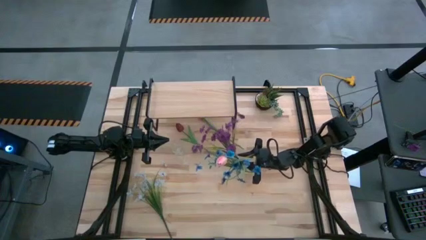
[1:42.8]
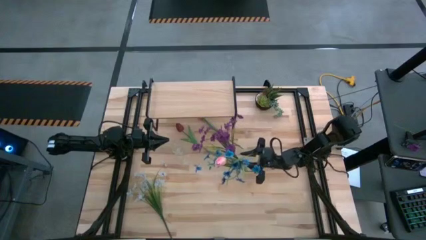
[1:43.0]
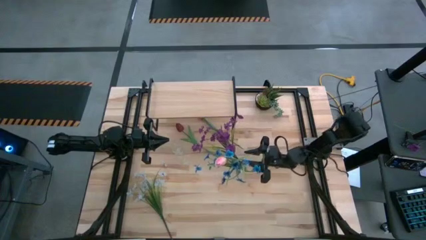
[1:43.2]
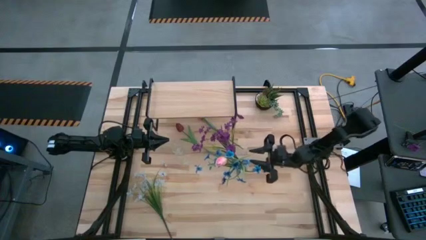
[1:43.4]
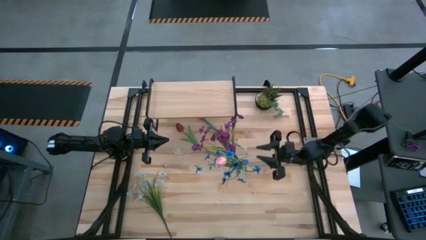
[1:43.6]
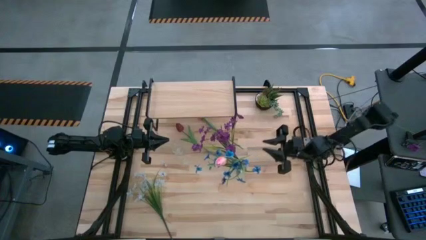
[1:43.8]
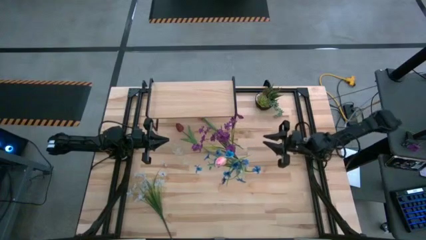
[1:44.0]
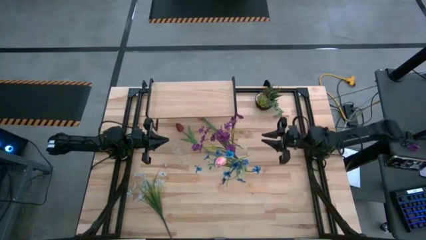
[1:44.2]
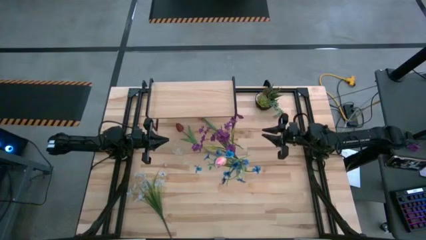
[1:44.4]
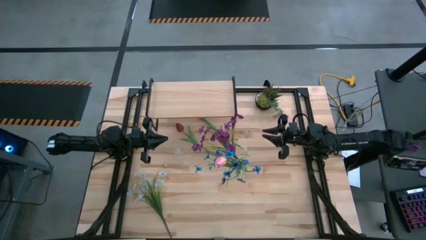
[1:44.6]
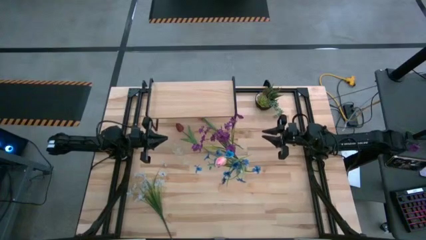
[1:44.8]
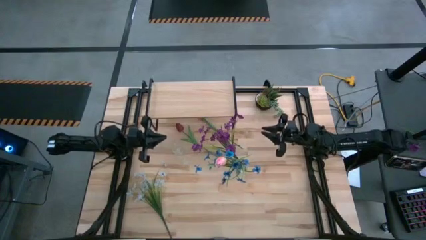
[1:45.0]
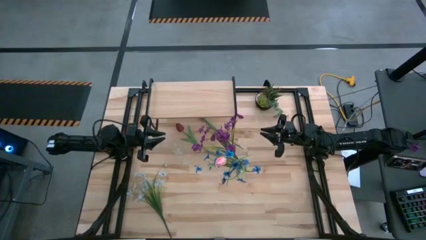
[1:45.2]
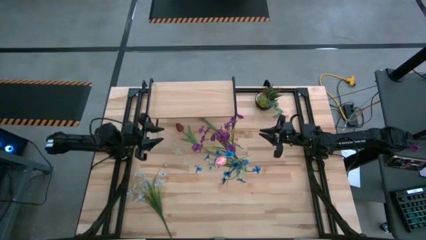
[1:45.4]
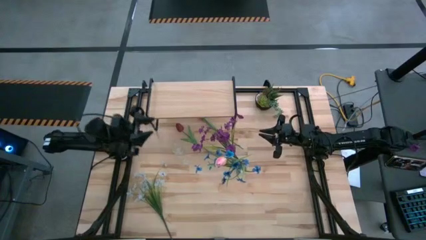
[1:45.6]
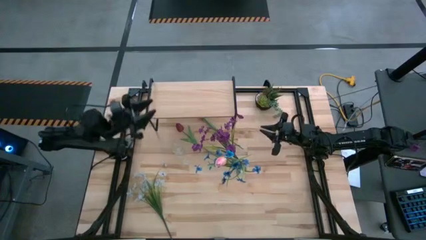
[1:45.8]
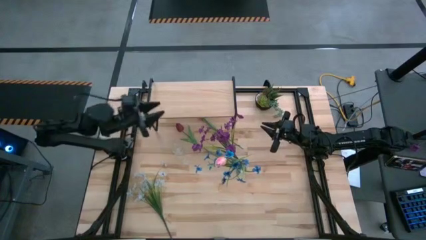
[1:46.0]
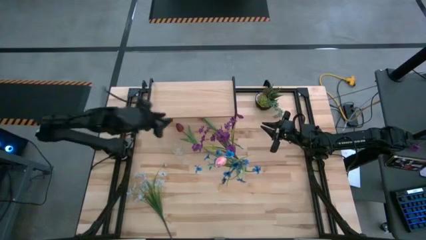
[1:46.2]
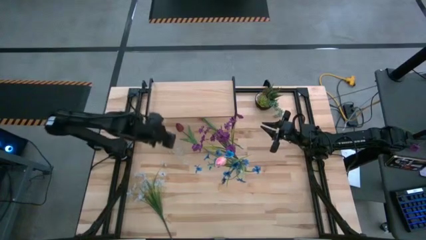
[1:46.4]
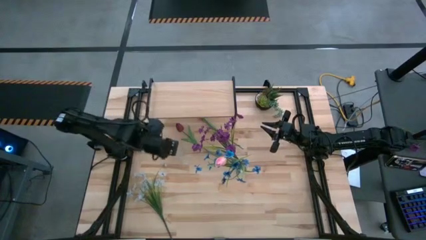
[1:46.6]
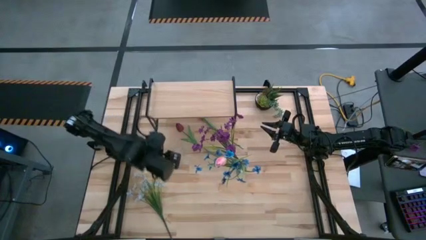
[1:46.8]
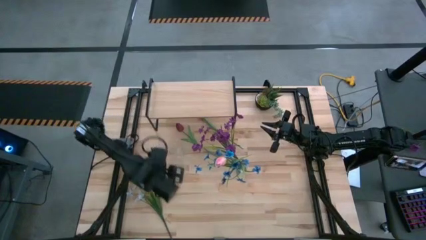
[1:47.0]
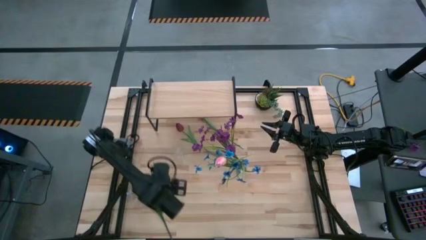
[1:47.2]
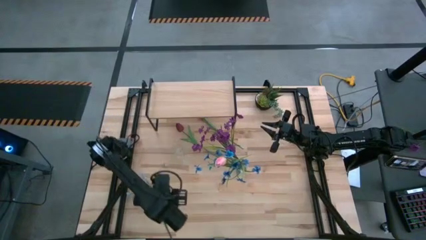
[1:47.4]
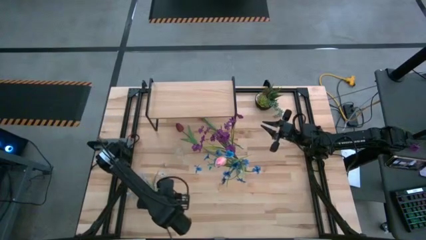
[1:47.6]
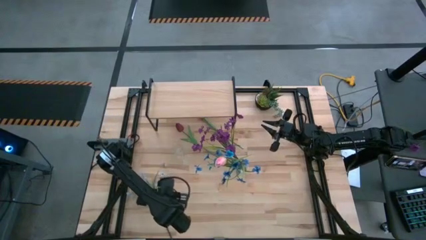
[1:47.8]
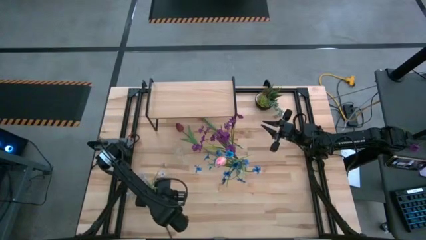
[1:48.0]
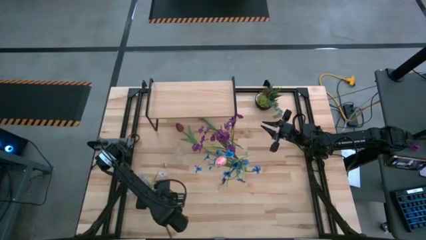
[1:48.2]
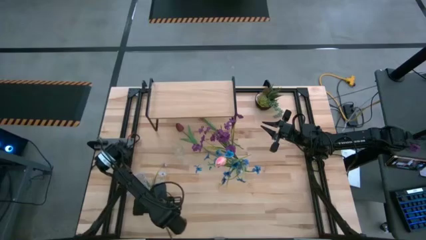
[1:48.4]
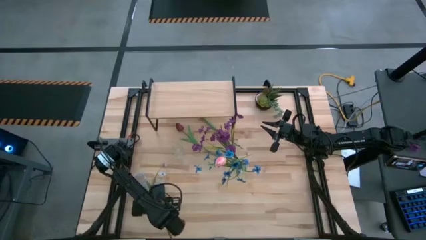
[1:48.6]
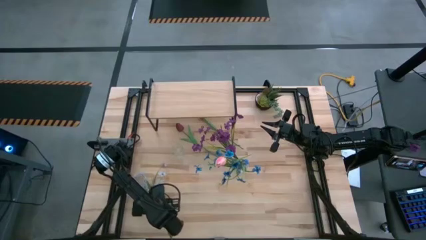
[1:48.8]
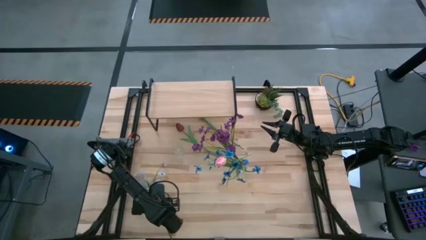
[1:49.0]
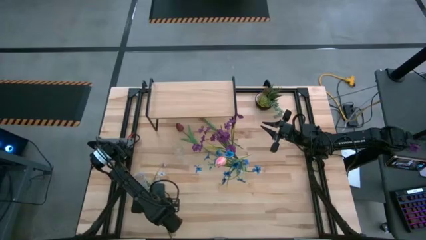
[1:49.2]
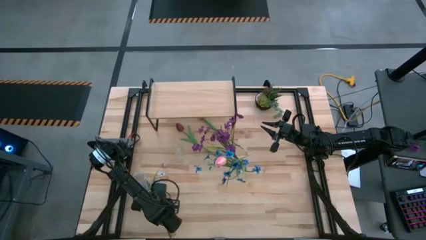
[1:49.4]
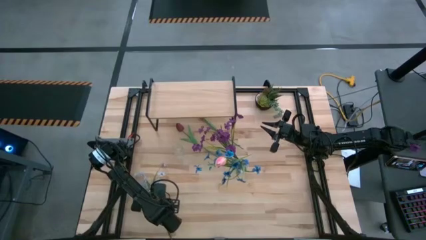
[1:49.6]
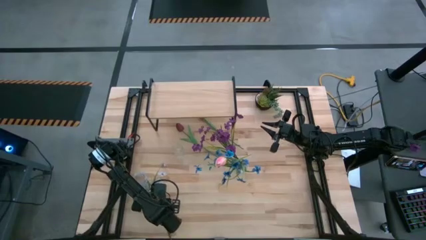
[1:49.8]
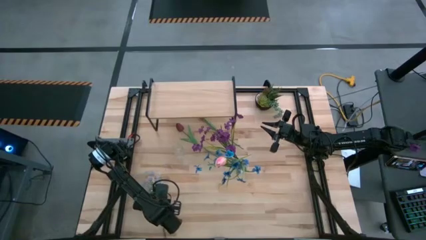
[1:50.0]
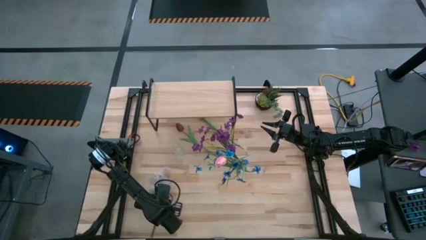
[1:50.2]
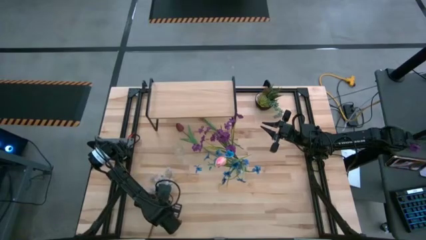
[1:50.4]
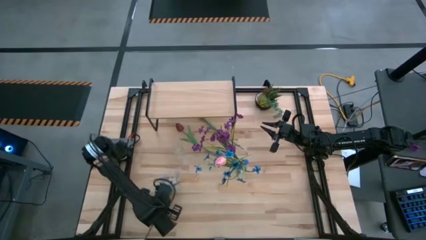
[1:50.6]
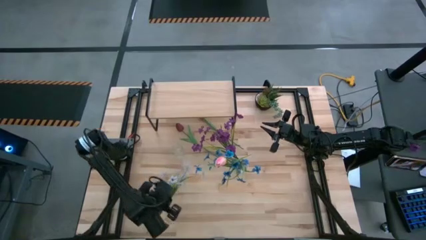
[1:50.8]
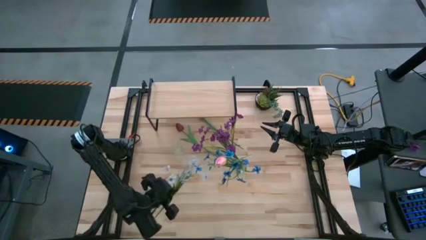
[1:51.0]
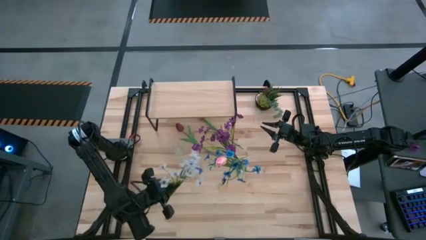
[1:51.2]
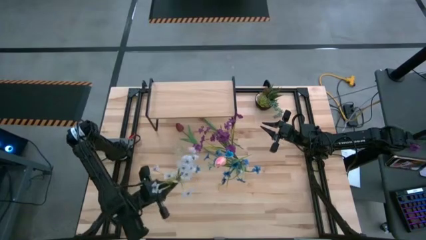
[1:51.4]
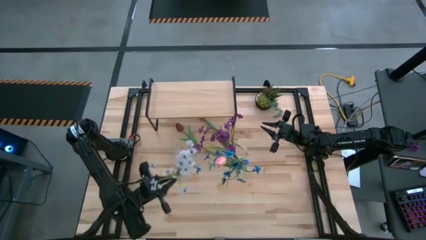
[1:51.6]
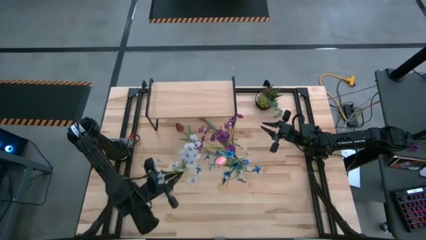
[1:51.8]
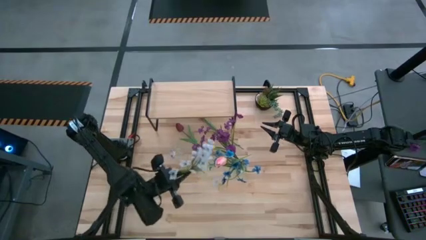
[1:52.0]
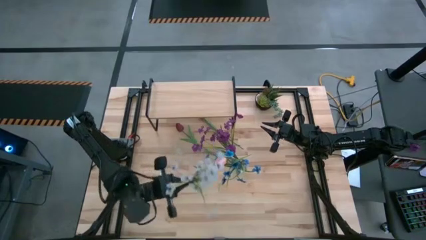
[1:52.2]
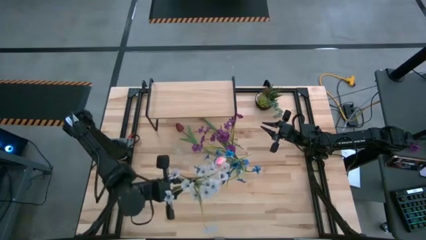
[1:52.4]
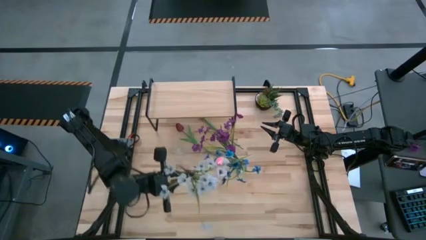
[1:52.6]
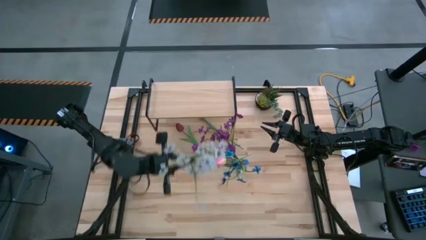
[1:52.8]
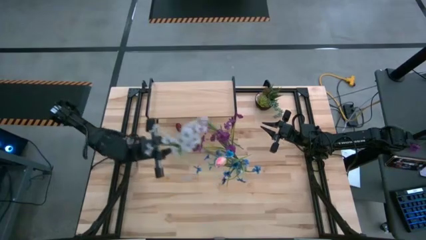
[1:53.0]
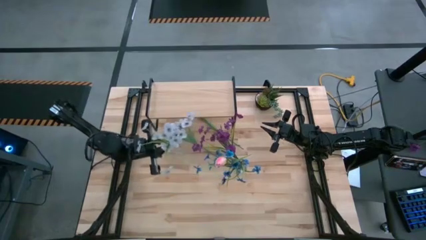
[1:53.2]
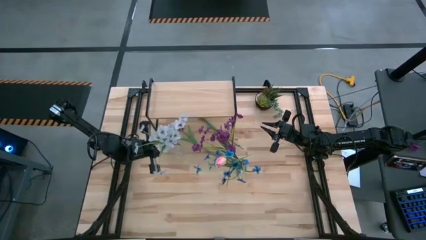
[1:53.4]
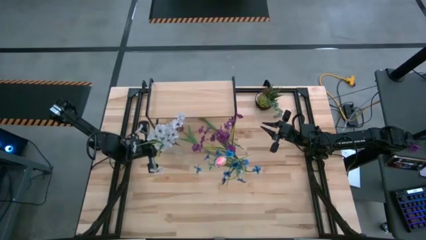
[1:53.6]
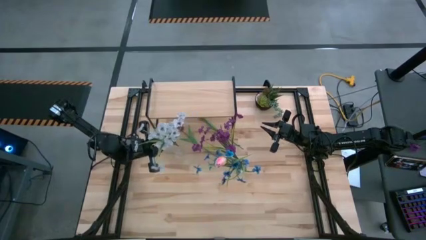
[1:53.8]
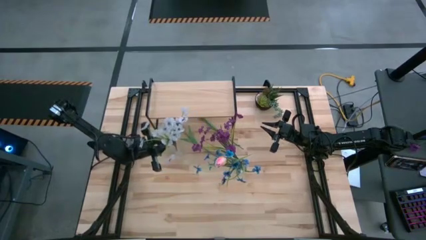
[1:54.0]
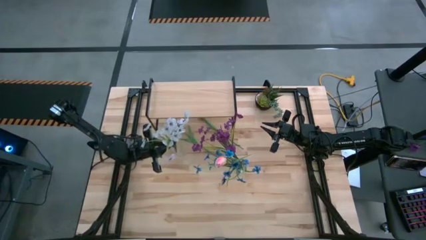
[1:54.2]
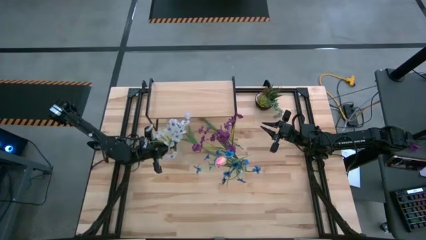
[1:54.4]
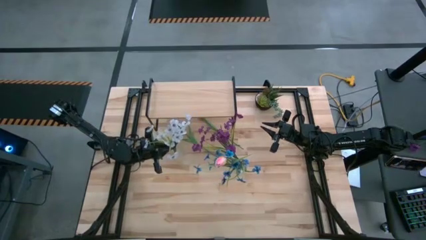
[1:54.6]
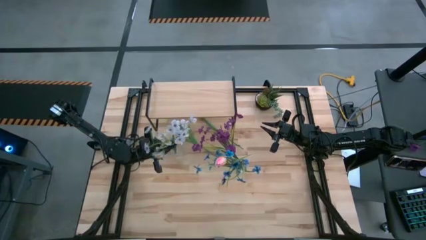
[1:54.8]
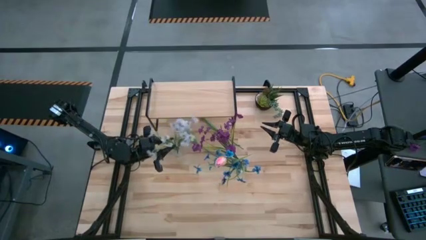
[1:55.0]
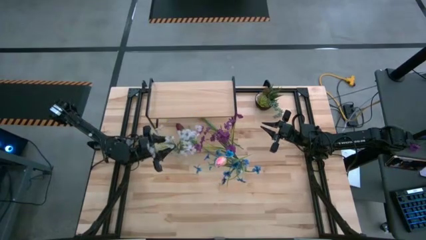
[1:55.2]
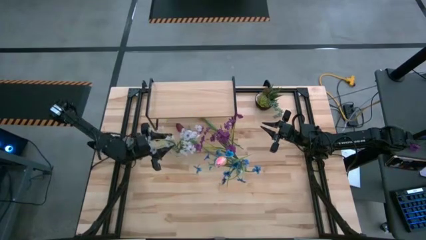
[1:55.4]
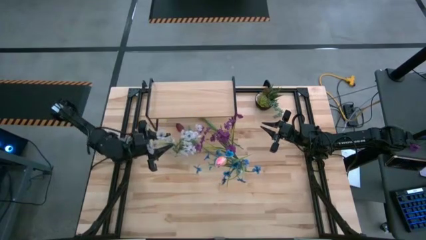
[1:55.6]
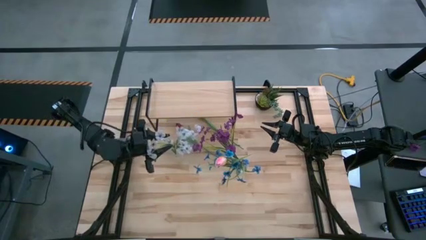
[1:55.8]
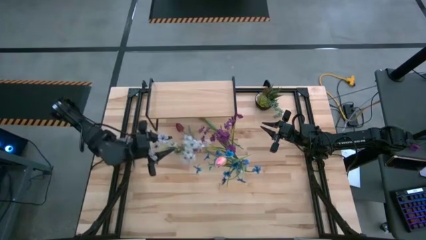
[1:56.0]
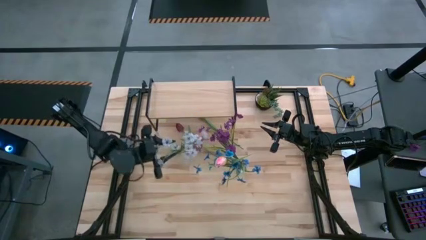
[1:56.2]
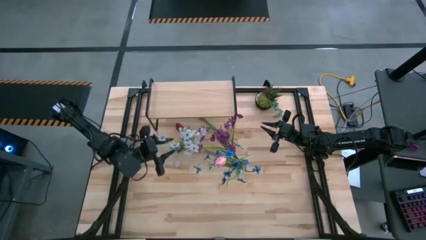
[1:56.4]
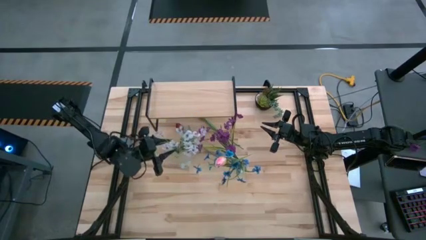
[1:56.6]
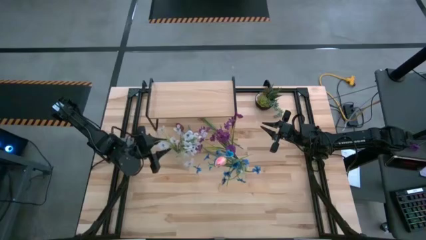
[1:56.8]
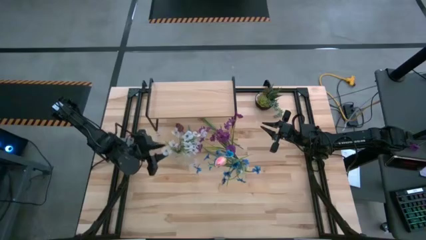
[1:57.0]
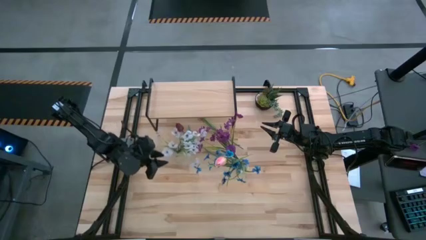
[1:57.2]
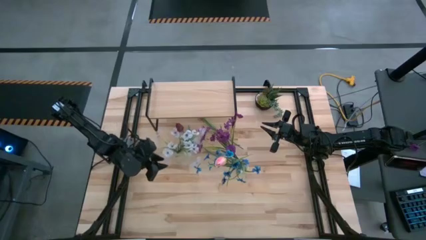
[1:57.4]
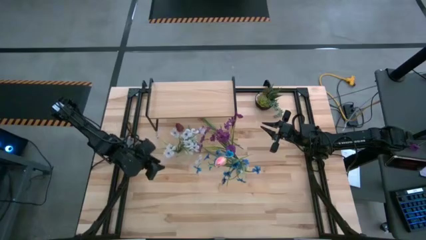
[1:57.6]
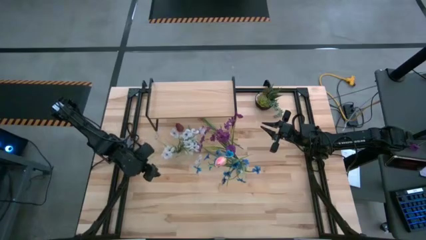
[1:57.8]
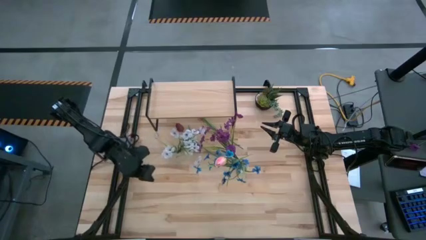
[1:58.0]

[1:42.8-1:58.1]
Task: Pick and place flowers into a vace then onto a shelf
Put the white flowers into the left transparent vase
